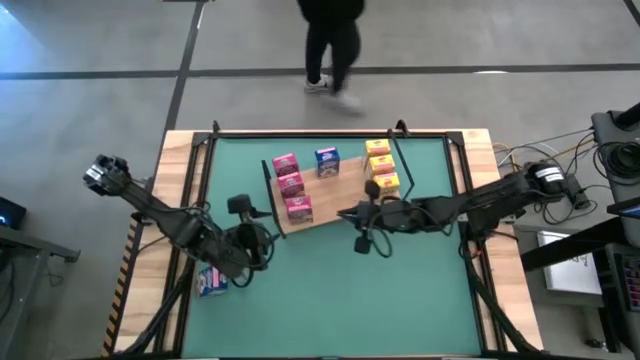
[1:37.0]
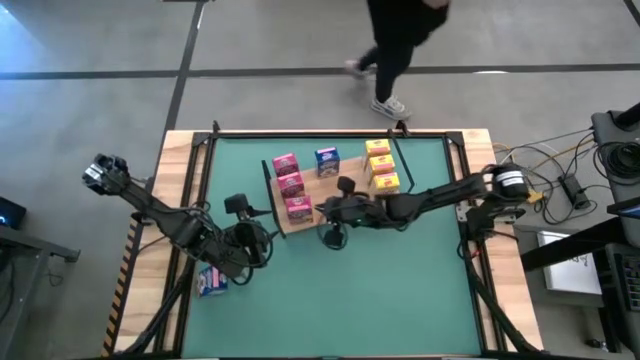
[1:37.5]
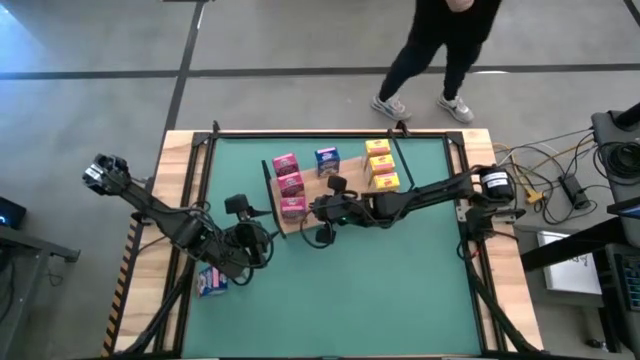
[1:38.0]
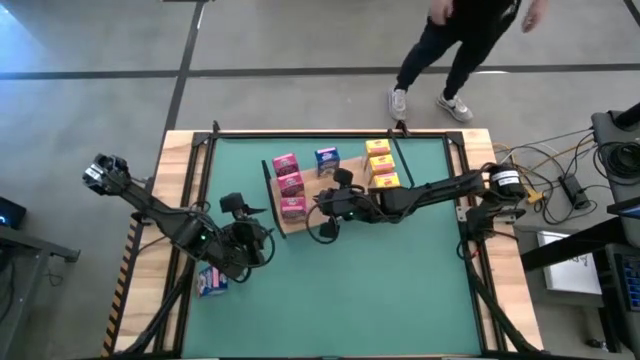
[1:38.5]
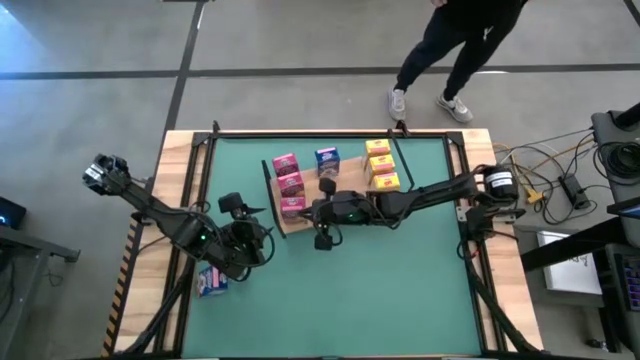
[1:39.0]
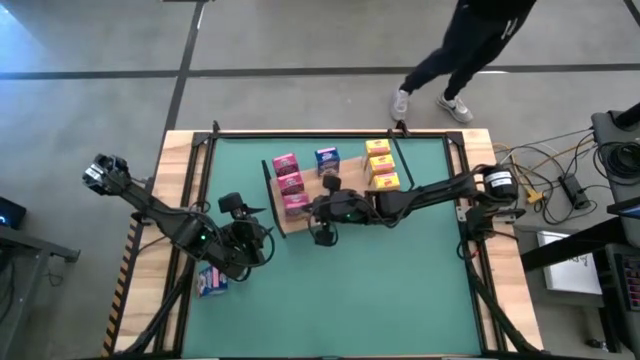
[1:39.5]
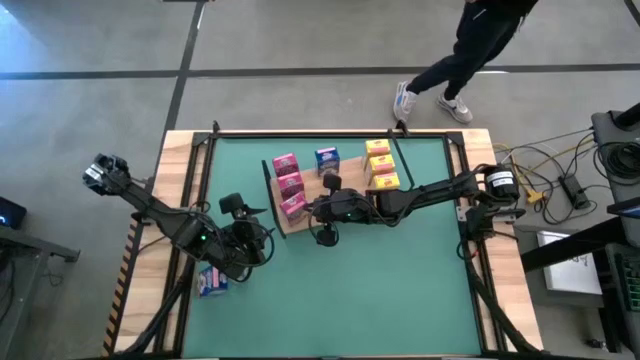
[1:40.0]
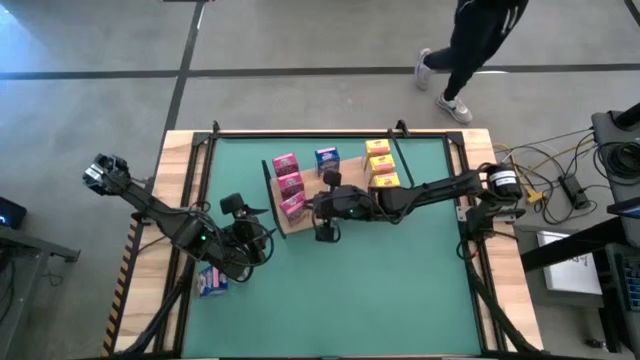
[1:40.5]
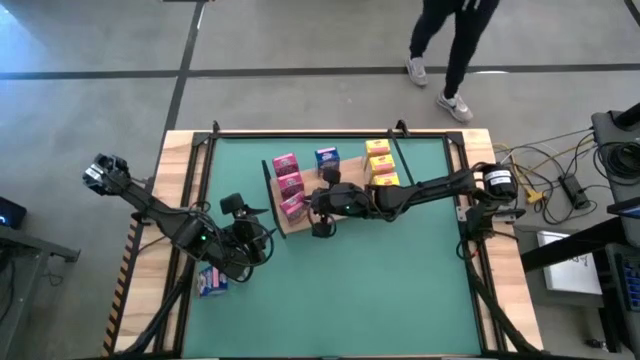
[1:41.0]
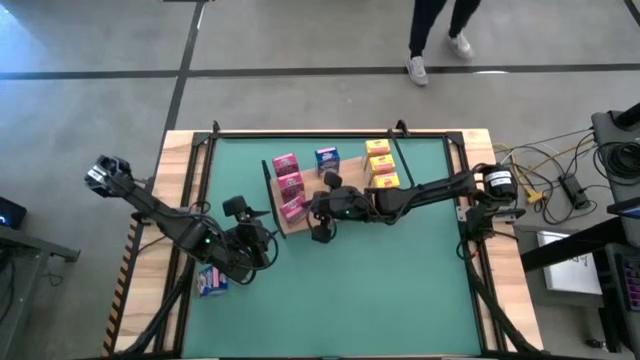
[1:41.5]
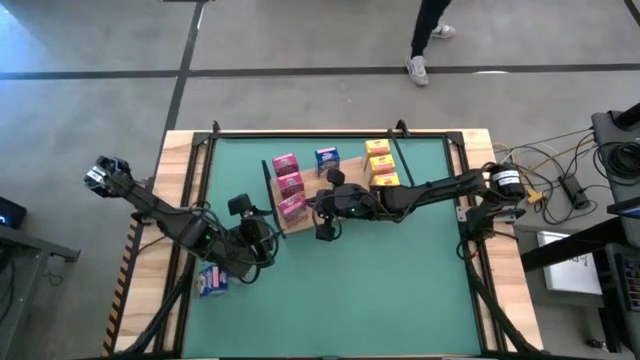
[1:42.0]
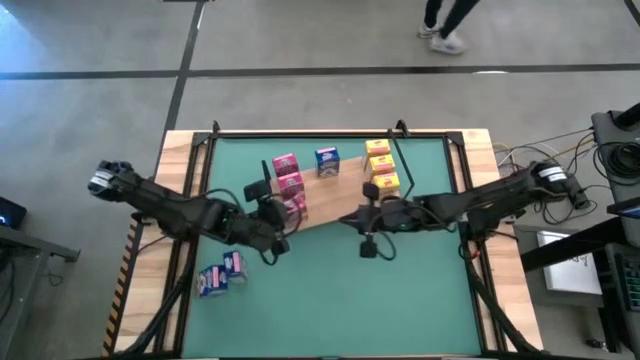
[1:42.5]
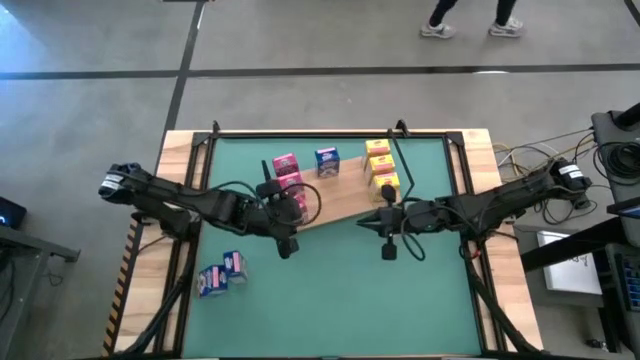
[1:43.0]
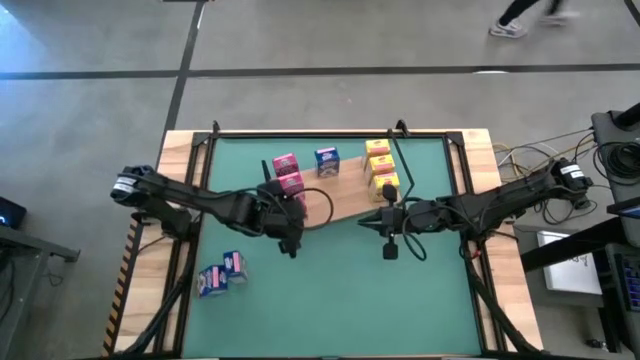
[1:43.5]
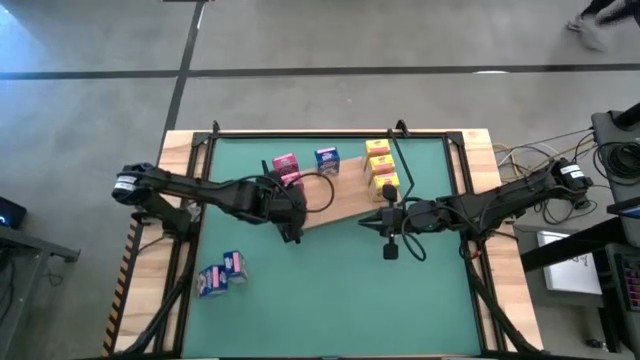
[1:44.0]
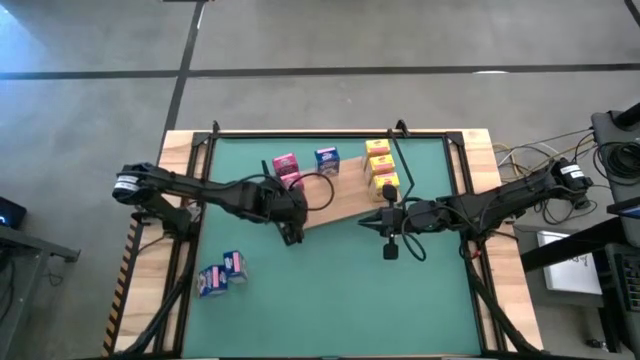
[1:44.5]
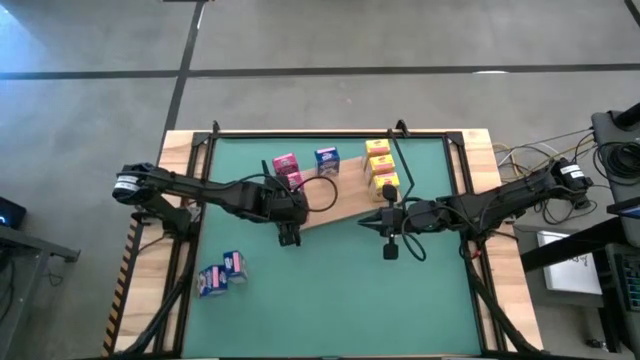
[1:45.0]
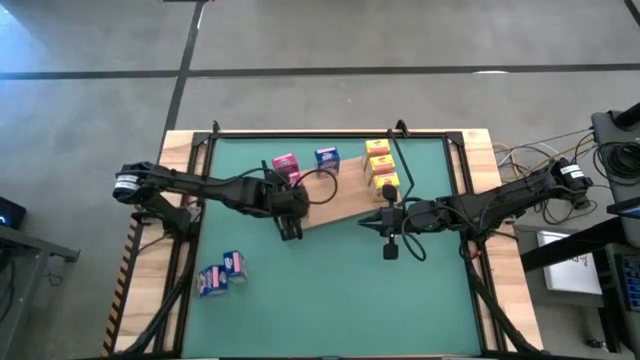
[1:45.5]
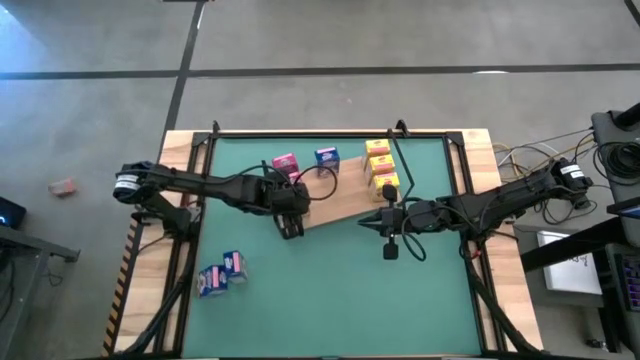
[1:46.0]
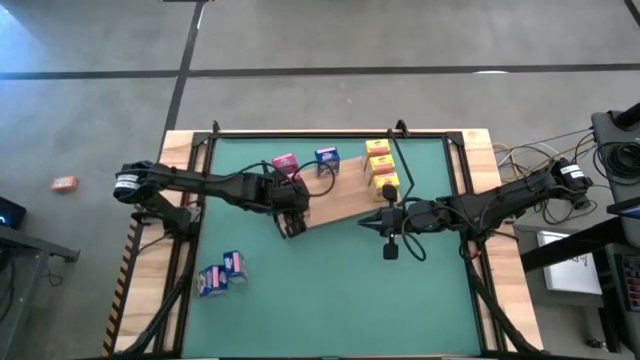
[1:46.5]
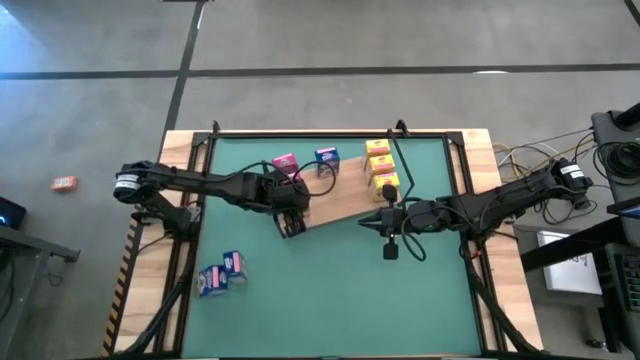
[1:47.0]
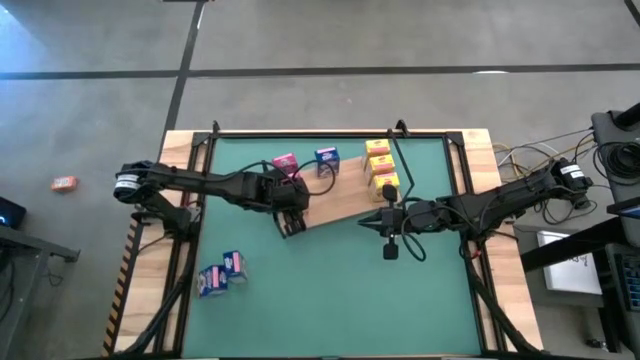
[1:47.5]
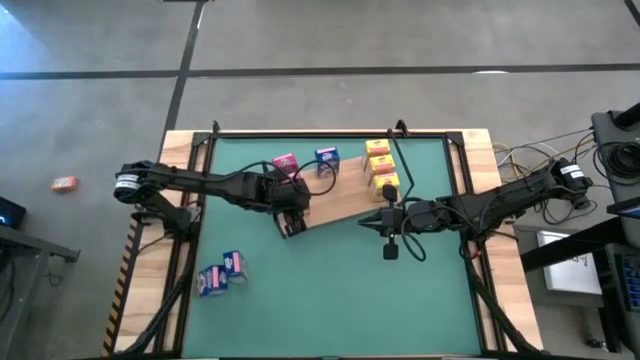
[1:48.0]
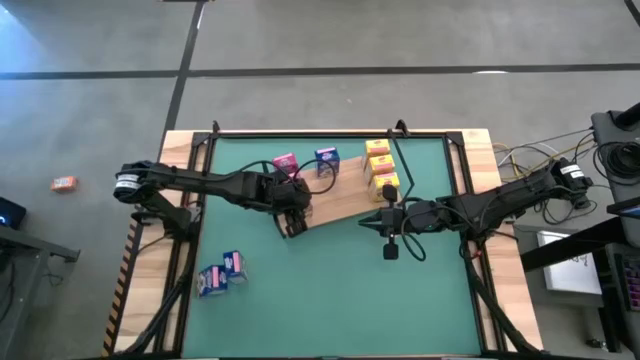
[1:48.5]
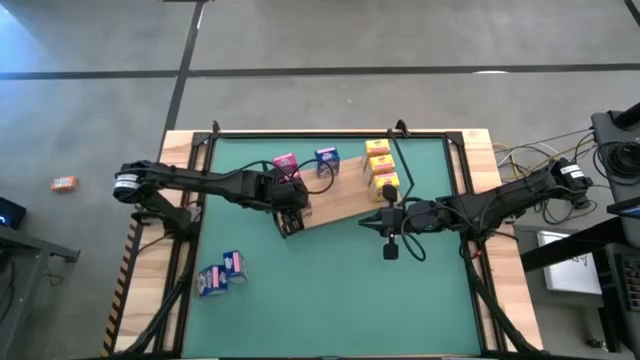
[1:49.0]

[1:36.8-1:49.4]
Task: Stack cereal on shelf
Put the pink cereal box on the shelf aligned with the other pink cereal boxes

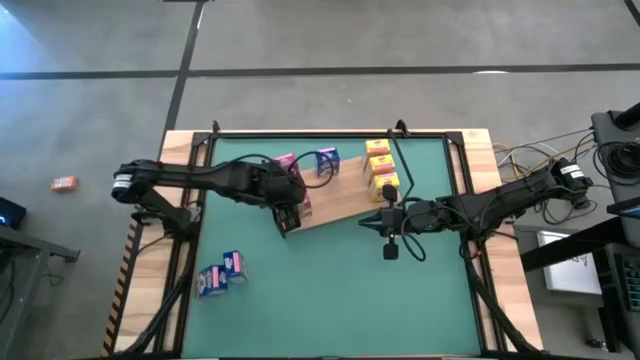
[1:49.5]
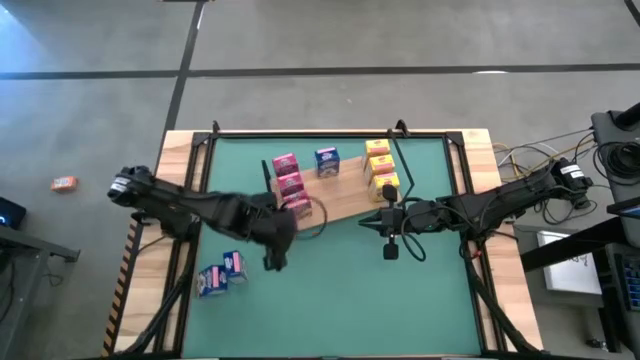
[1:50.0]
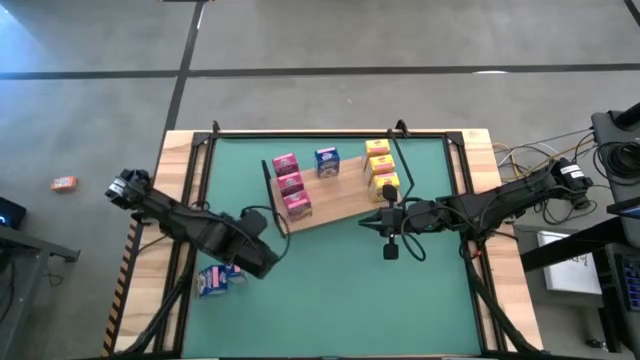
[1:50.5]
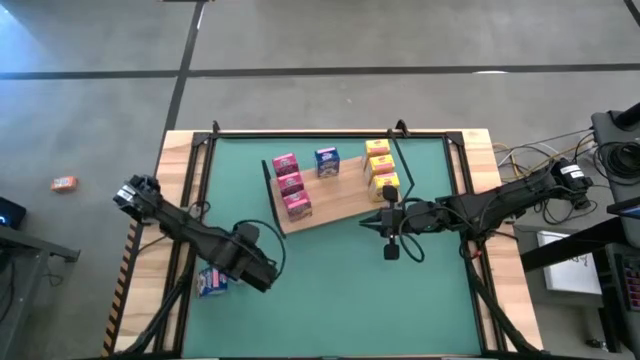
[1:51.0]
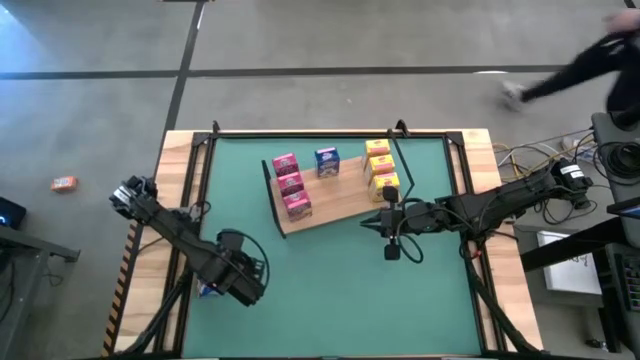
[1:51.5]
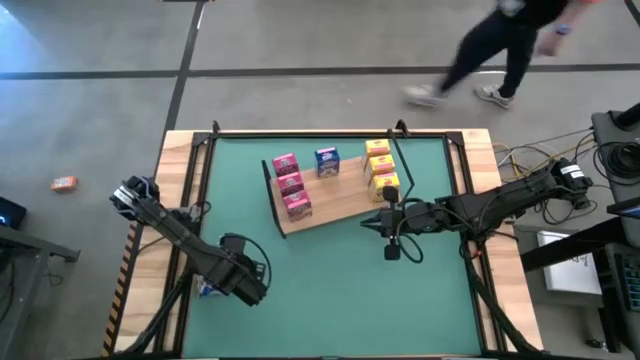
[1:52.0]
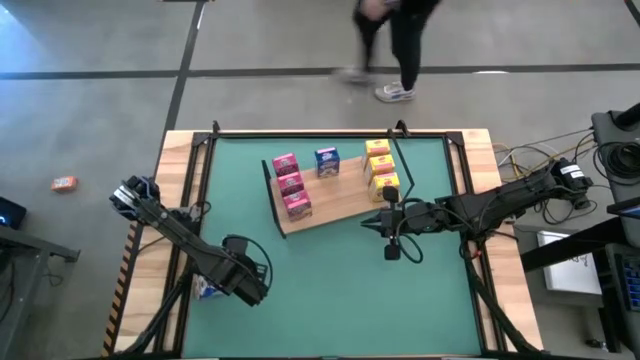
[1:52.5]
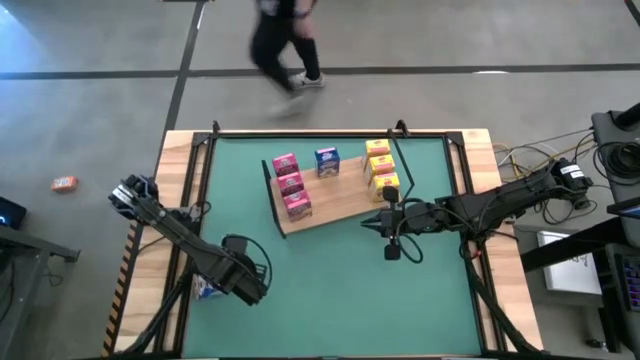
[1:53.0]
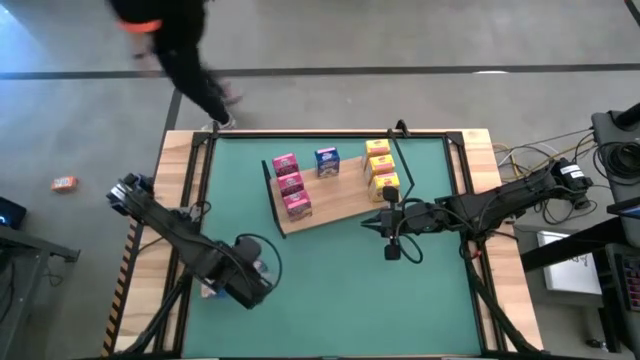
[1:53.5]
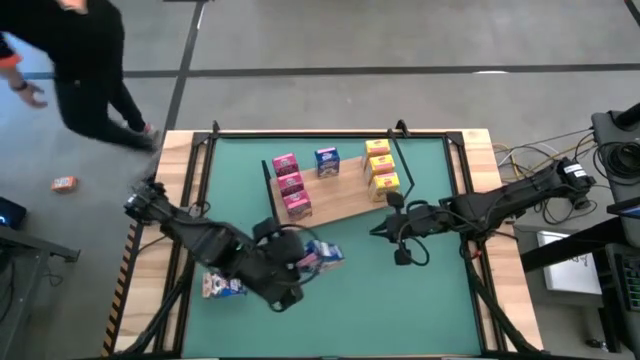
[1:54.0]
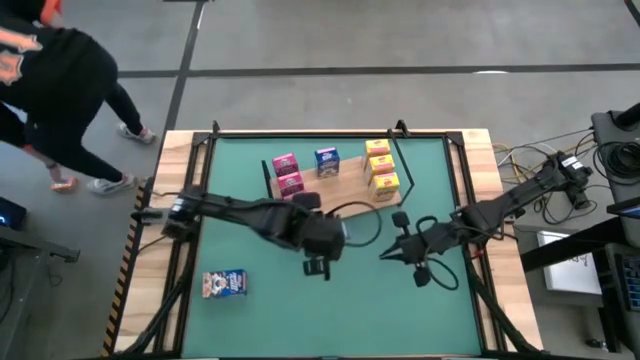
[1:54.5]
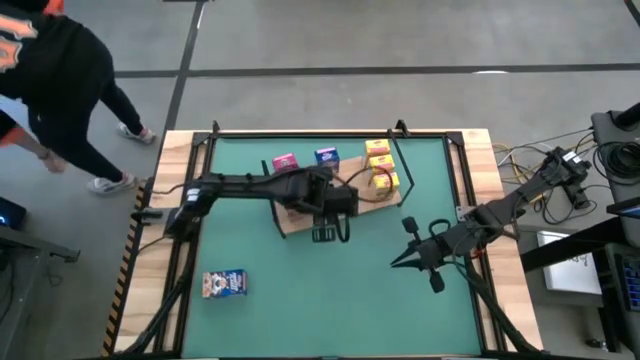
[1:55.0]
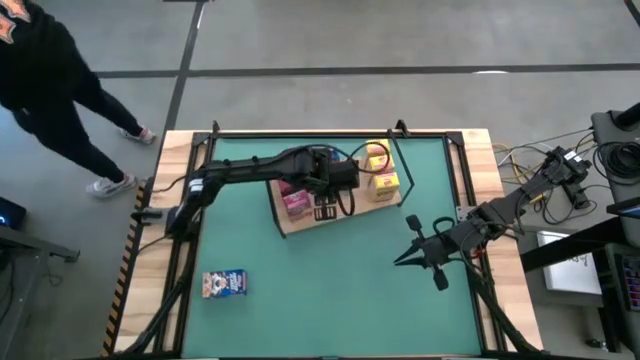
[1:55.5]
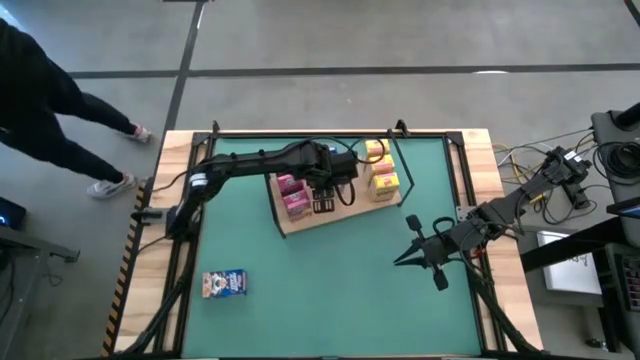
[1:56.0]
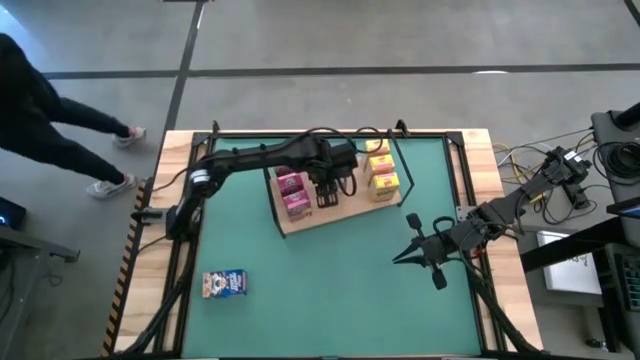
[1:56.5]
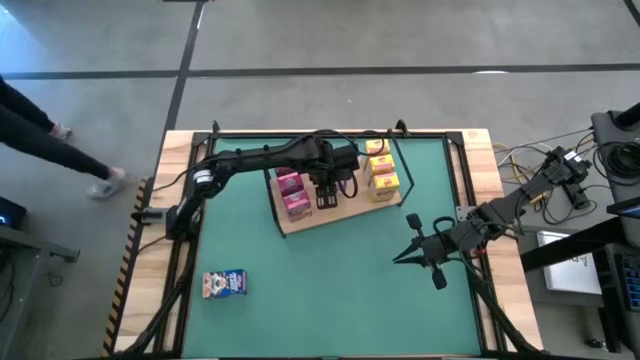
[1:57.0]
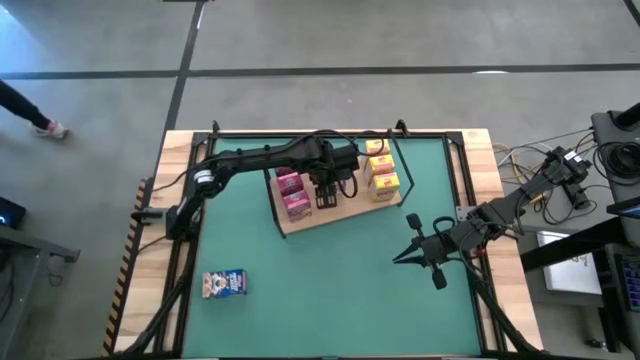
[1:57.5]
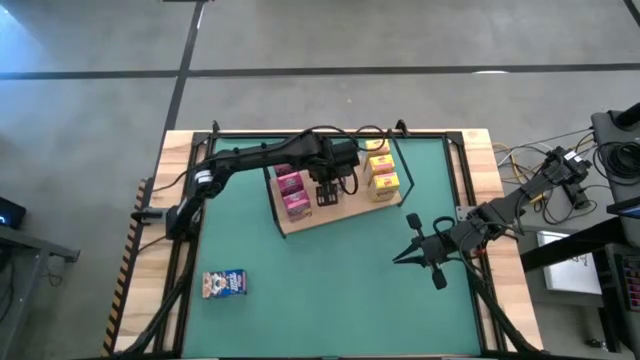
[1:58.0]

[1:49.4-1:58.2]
Put the right blue cereal box on the shelf aligned with the other blue cereal box

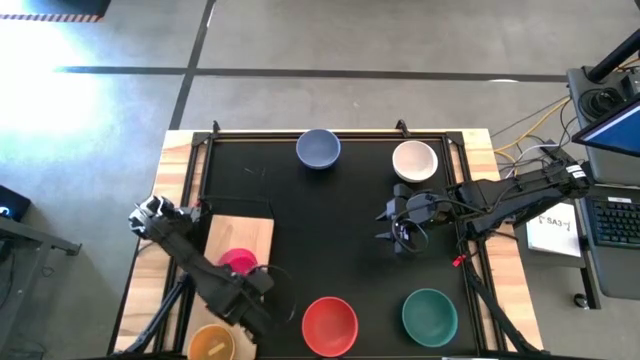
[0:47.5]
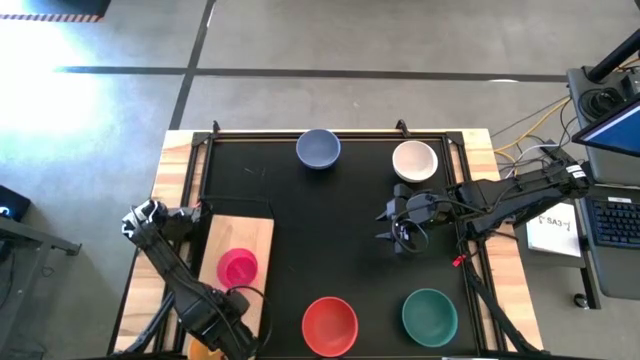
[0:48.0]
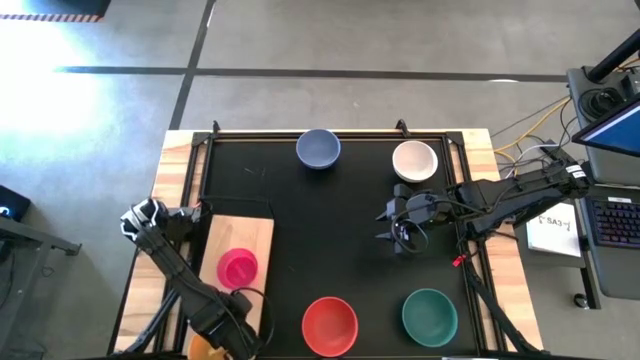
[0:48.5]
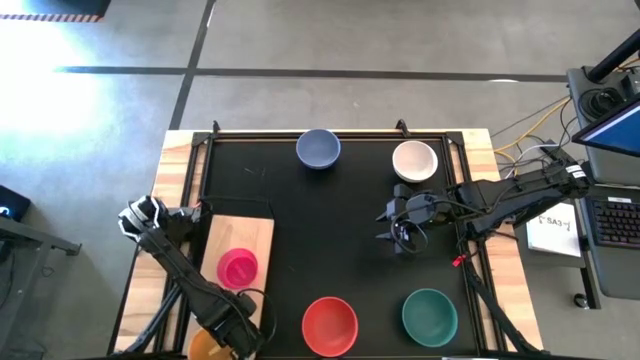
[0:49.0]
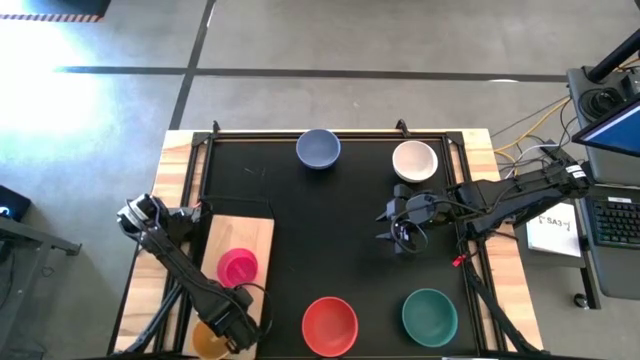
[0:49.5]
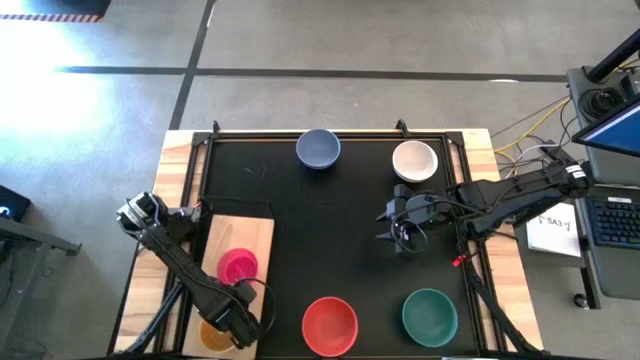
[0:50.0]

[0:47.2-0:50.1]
Task: Place and stack bowls onto a shelf
Adjust the bowls on the shelf
